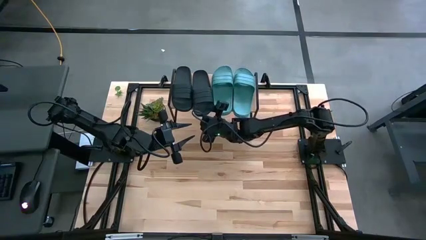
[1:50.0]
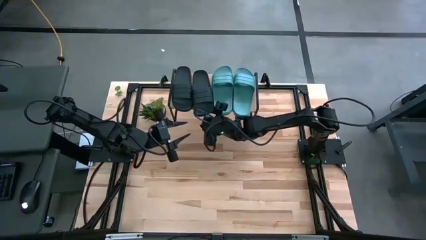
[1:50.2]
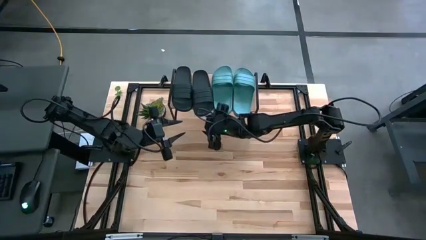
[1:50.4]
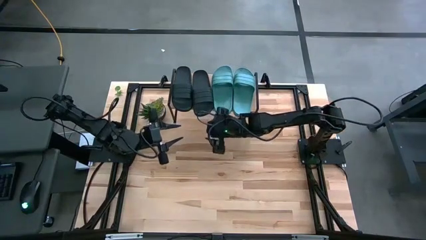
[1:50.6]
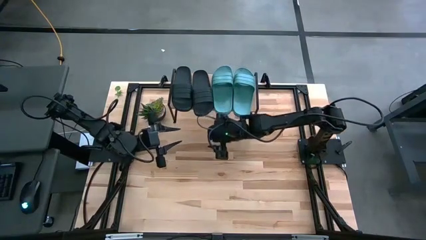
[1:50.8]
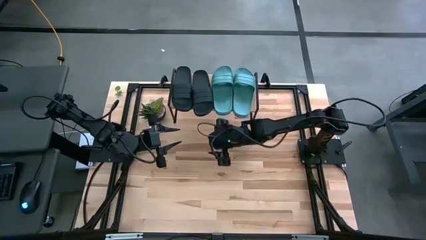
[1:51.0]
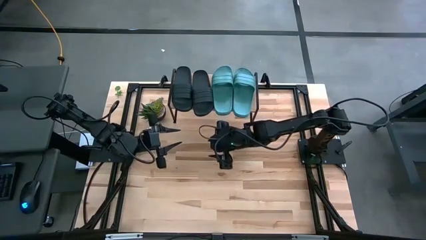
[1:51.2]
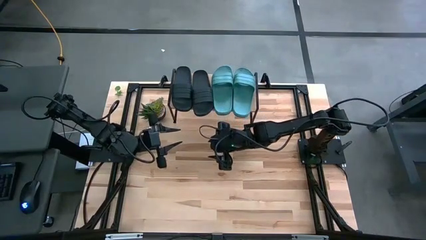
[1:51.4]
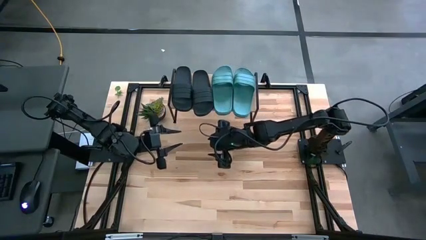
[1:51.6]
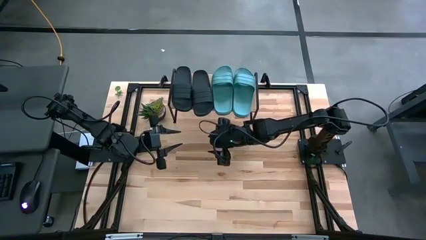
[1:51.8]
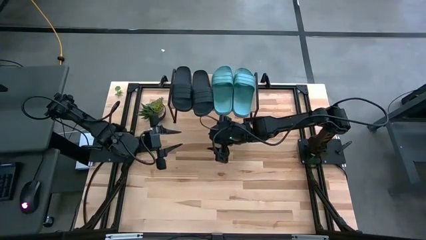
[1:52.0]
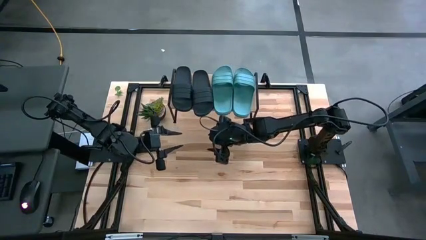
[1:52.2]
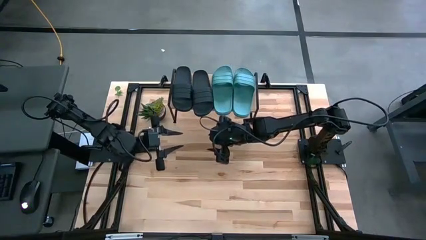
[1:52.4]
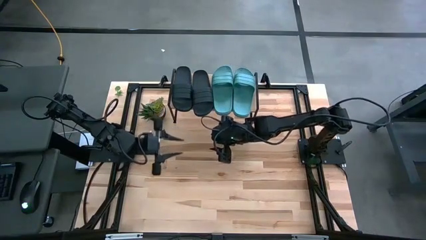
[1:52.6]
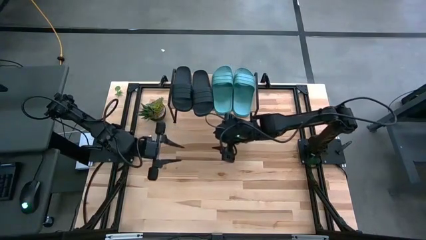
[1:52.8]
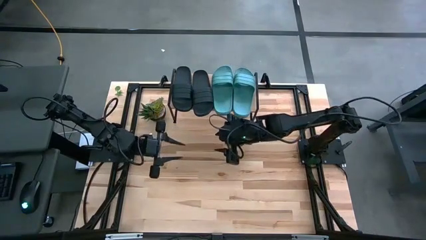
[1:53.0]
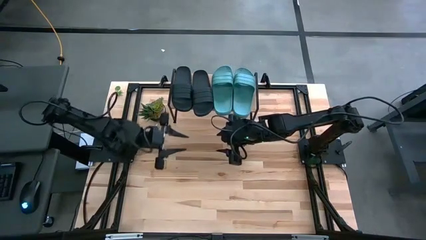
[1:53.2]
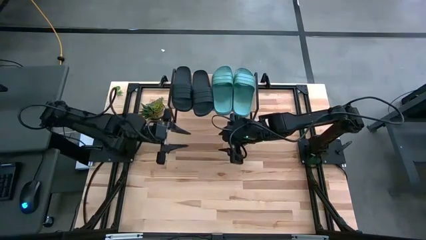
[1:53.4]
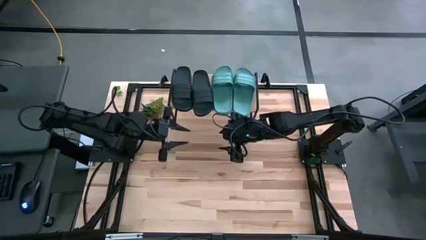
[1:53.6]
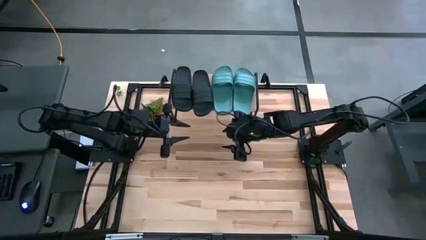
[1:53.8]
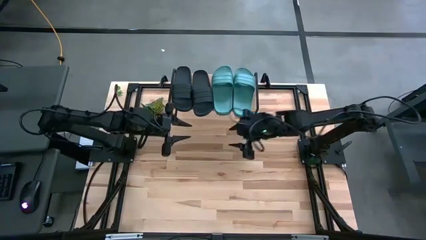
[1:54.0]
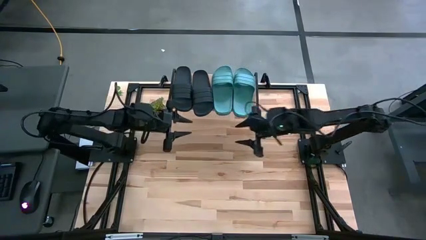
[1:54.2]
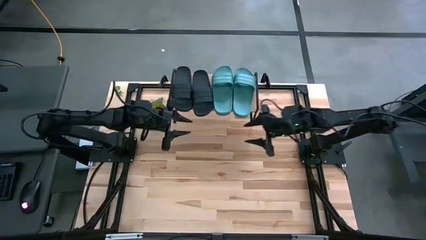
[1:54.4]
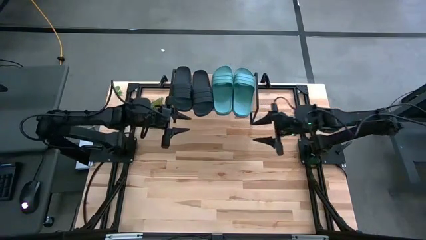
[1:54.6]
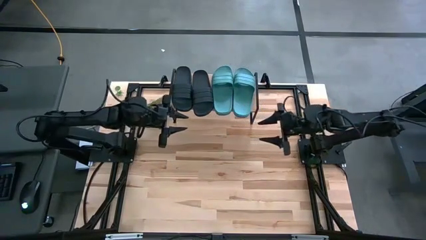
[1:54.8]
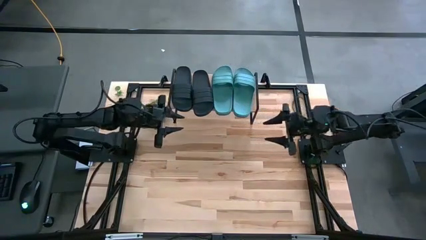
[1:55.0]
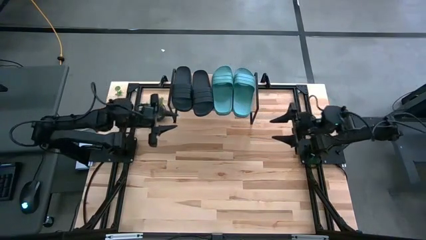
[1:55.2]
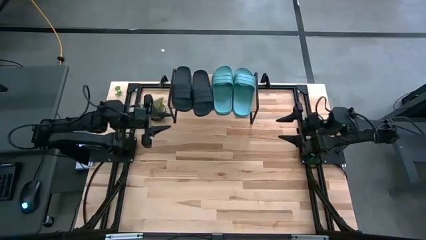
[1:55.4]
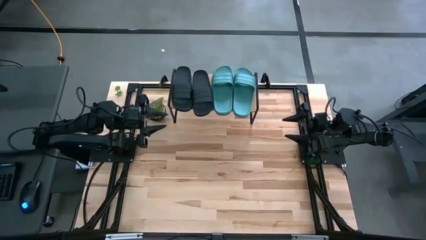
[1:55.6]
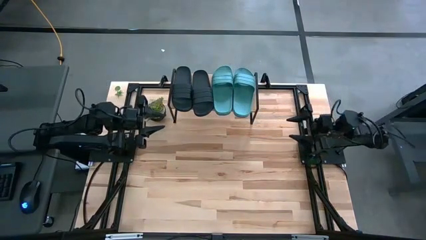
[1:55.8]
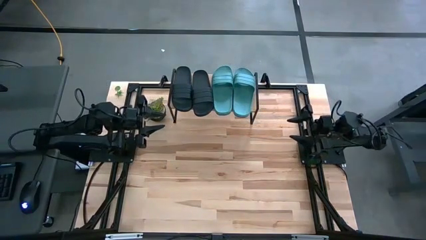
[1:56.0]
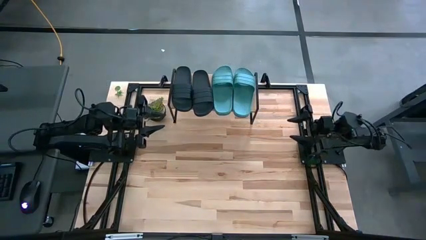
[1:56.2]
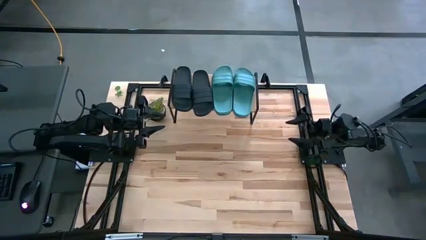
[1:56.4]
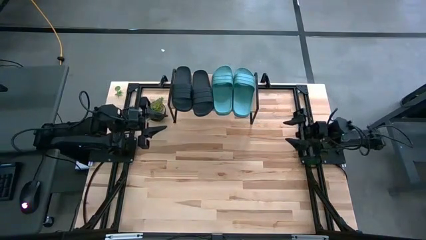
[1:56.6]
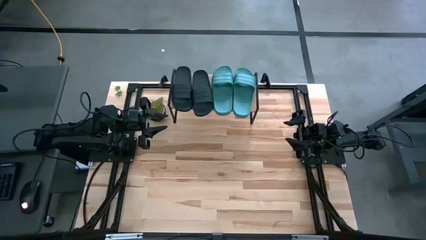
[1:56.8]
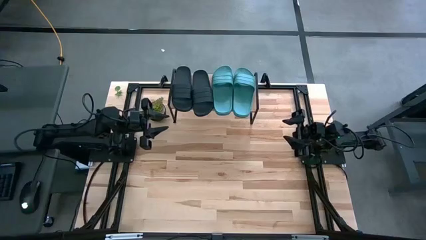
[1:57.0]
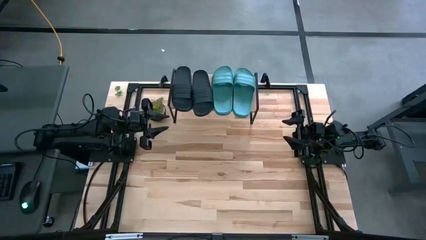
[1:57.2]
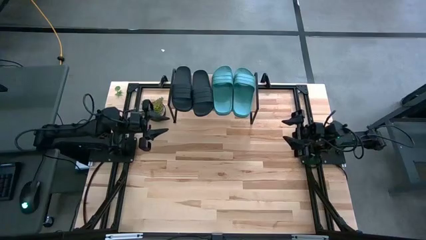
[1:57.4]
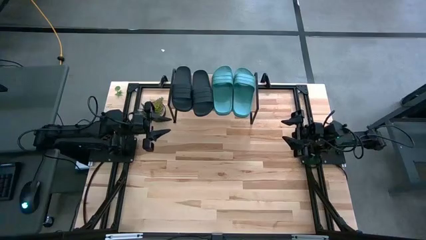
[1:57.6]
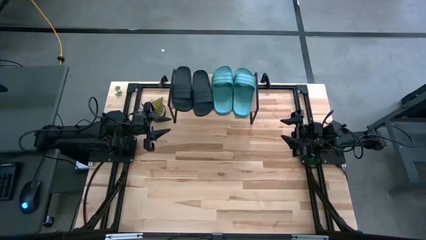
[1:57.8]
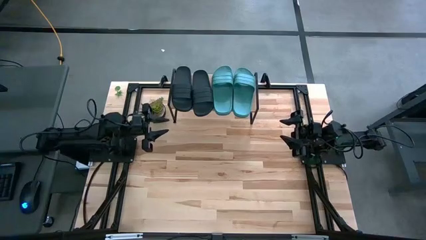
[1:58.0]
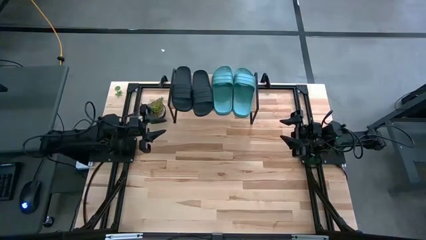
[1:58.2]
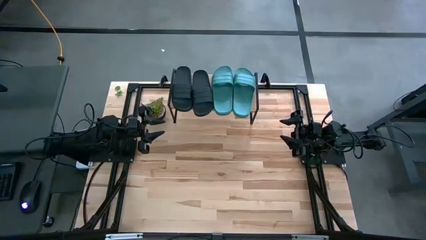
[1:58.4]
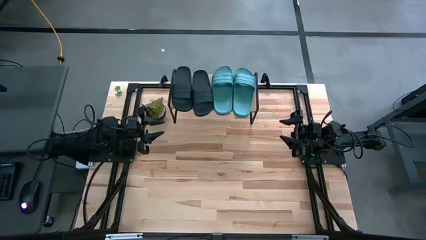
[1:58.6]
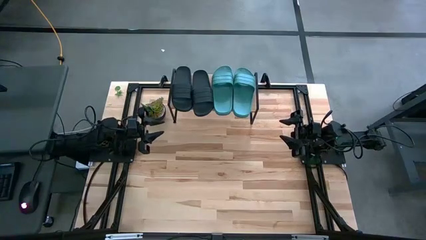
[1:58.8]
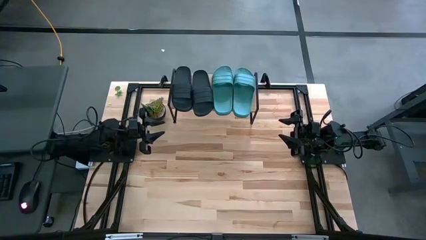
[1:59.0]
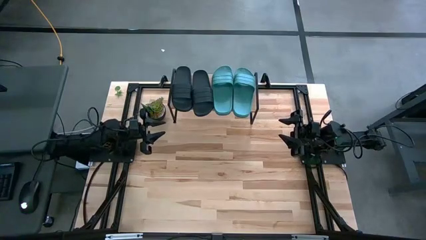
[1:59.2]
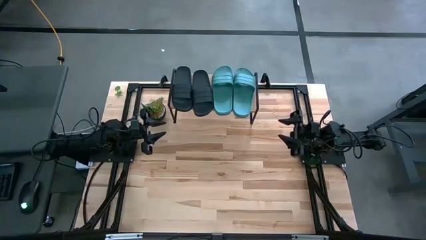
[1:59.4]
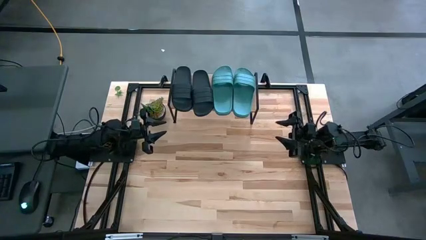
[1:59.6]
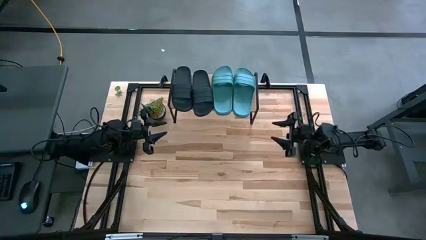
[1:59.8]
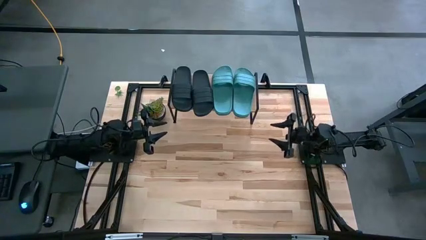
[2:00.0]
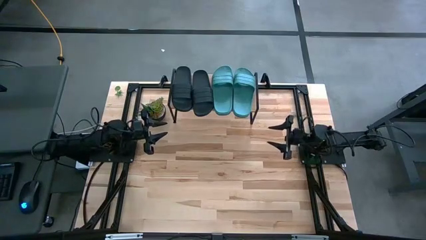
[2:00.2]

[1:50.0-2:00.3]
Task: Pick and place slides into the shelf
Return to Home Position

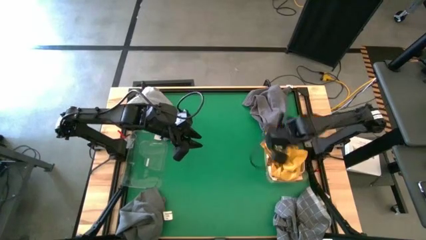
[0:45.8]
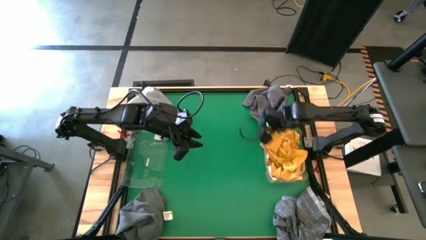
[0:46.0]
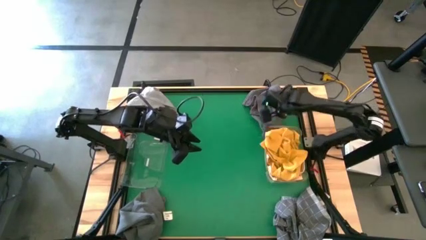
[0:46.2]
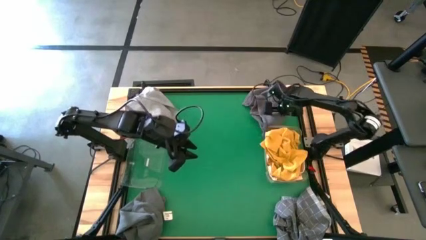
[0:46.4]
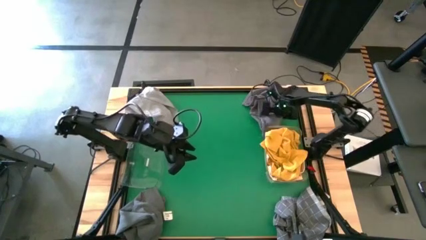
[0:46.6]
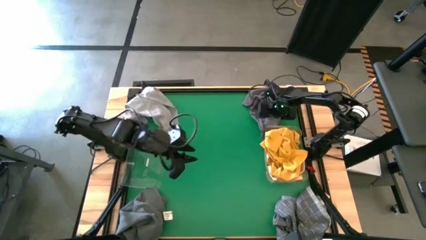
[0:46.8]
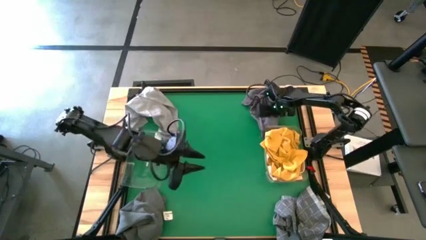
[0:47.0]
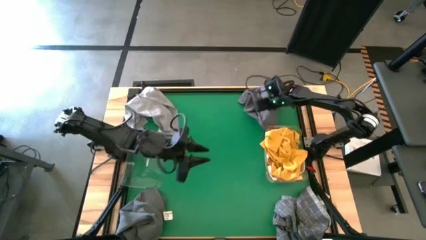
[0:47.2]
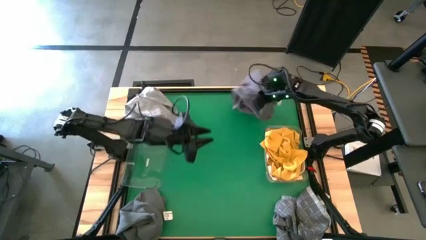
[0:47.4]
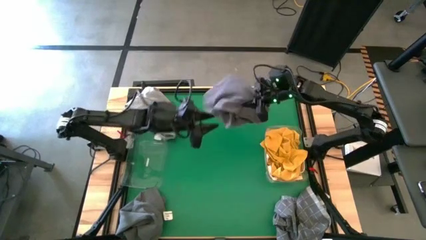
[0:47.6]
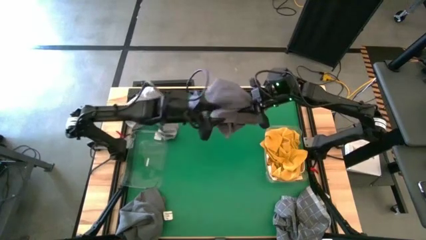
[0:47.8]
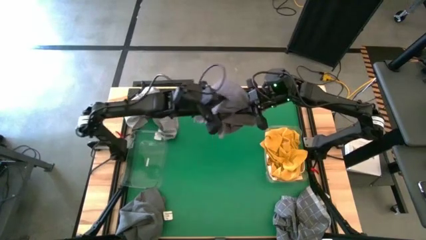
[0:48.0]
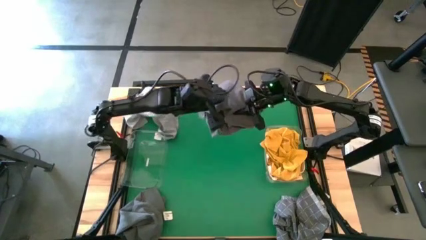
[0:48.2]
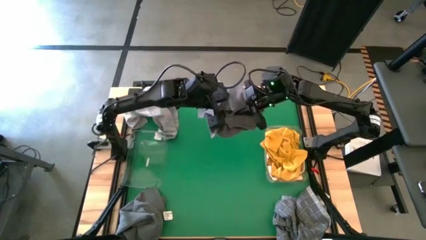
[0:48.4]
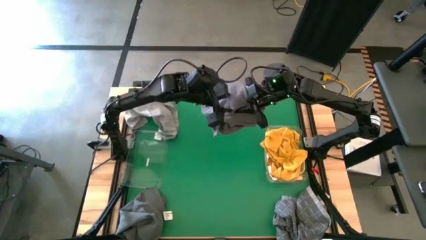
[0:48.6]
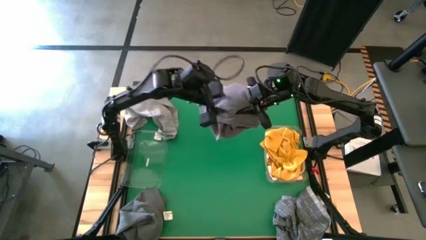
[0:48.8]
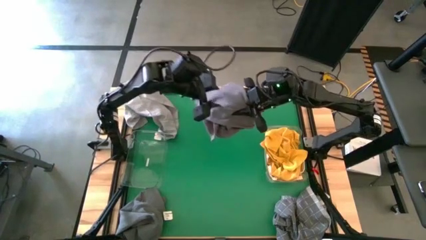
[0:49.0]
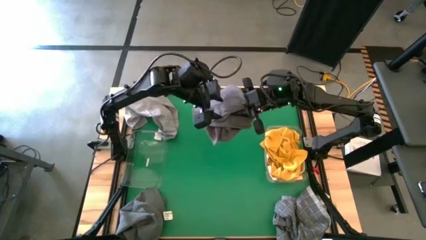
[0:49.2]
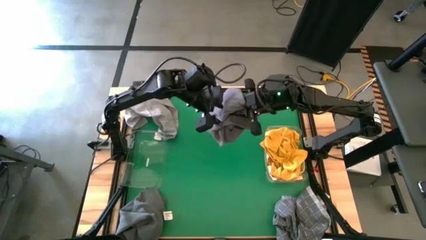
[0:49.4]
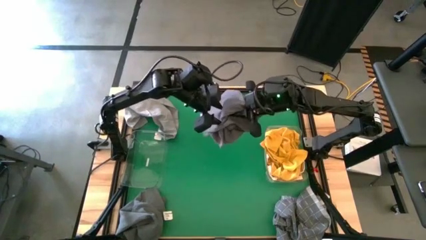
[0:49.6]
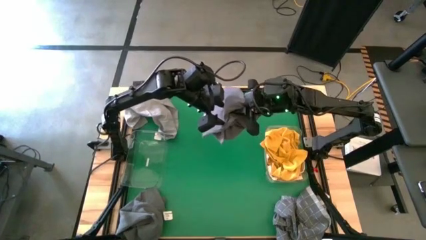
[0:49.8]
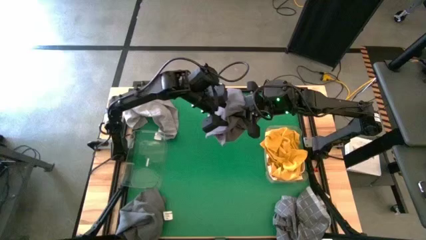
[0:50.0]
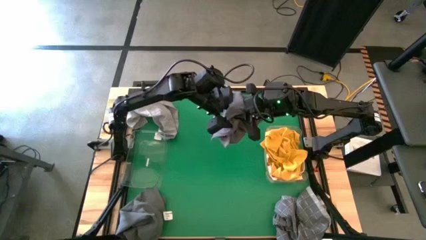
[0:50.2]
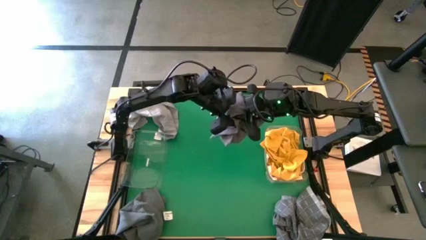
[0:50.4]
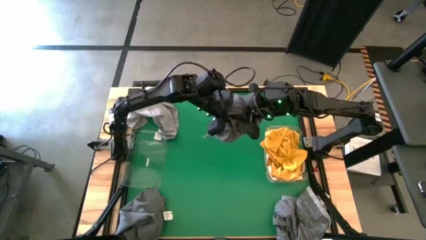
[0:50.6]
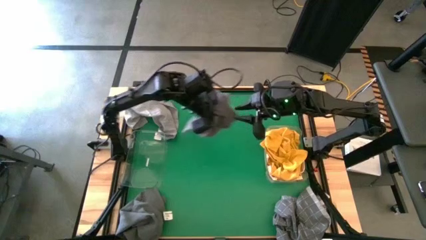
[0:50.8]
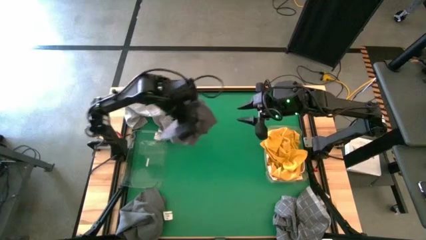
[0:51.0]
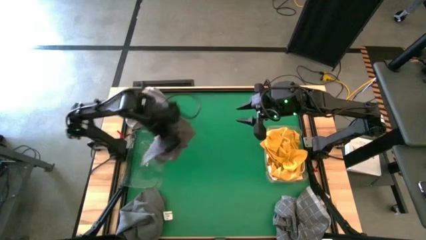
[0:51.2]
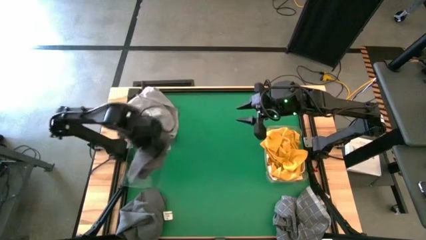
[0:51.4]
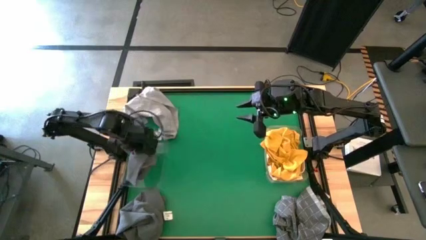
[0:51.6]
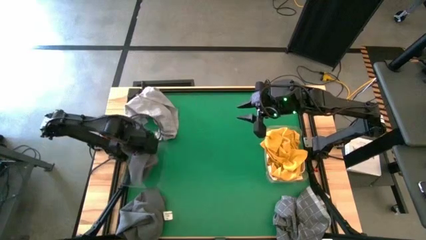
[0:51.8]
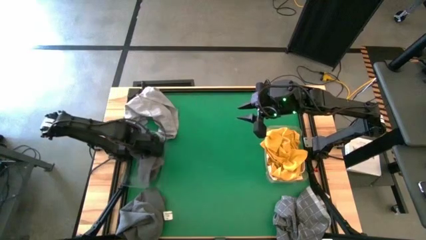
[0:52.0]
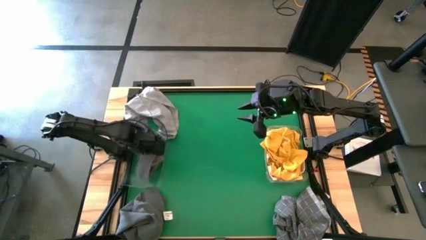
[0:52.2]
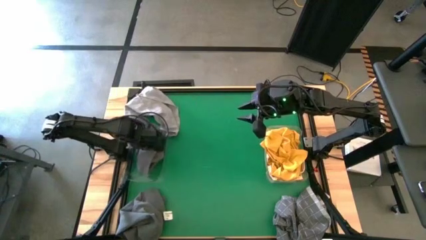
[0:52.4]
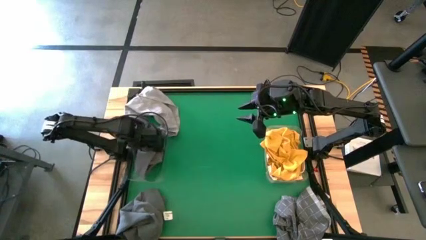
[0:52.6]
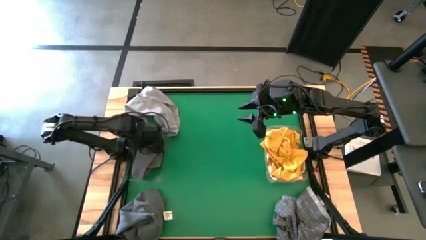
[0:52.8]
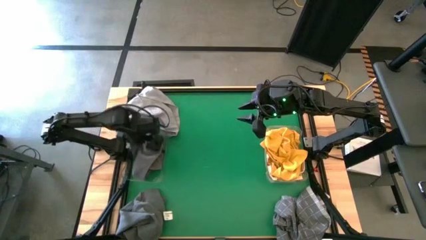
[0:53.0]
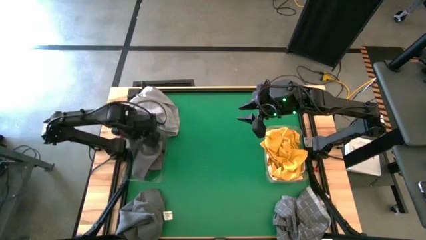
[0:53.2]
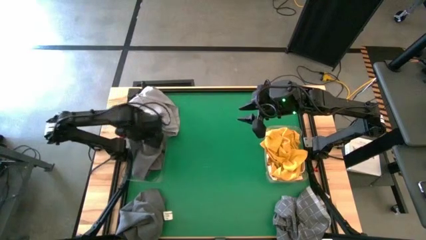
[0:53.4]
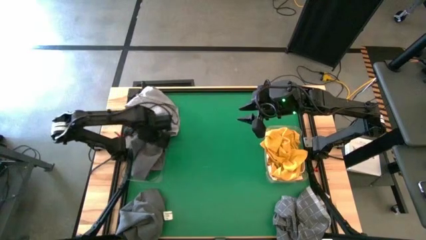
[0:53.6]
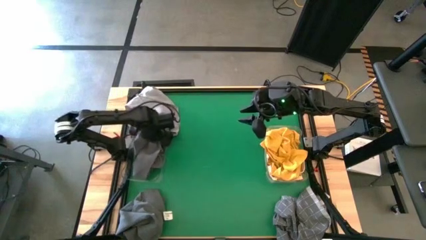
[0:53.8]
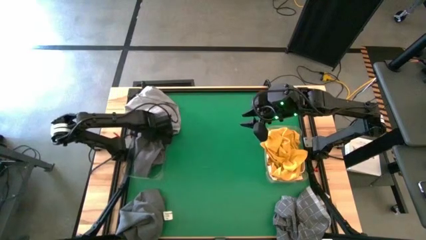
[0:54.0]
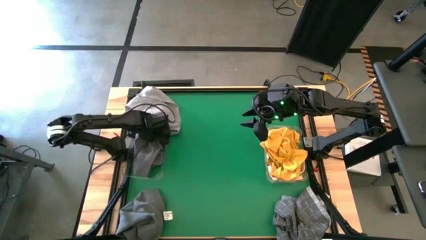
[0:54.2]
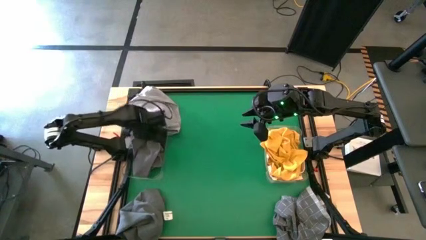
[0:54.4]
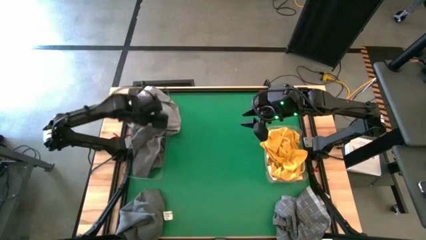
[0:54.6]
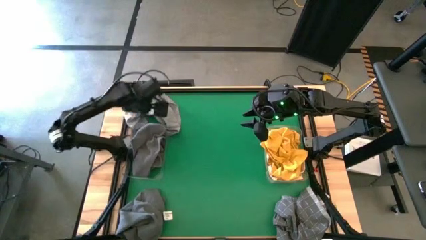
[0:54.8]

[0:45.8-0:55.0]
Task: Sort microfiber towel by color & place in baskets
Put the top gray microfiber towel into the left transparent bin
